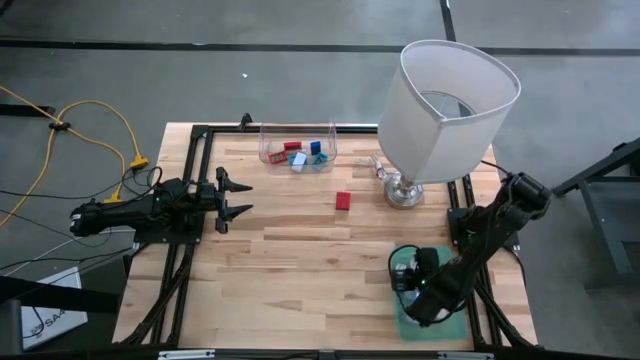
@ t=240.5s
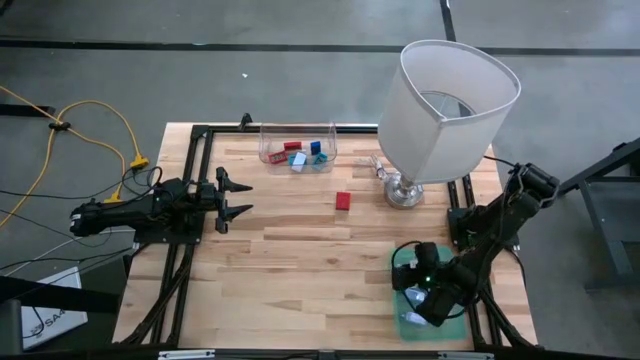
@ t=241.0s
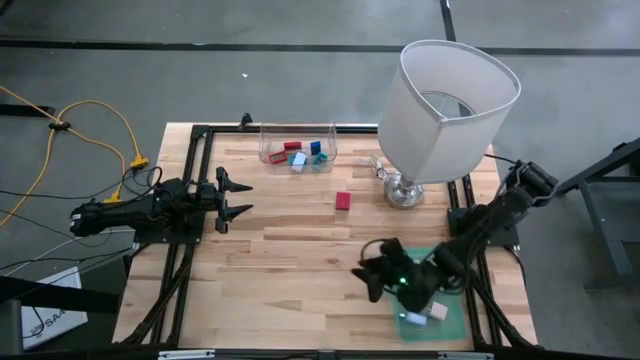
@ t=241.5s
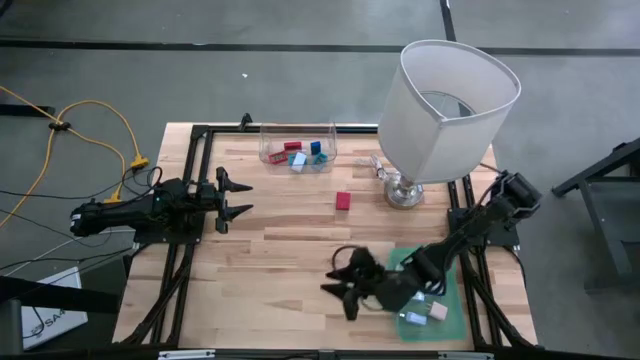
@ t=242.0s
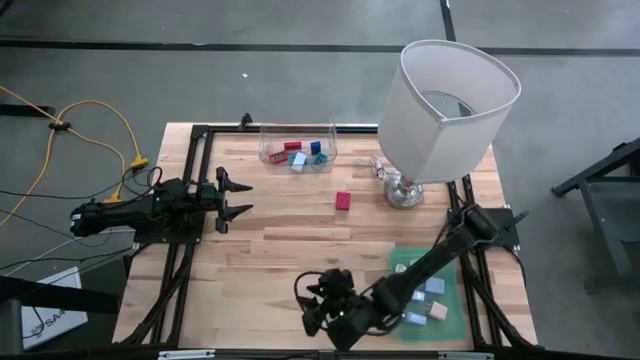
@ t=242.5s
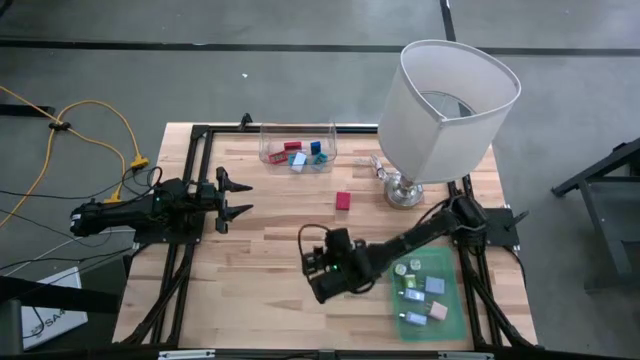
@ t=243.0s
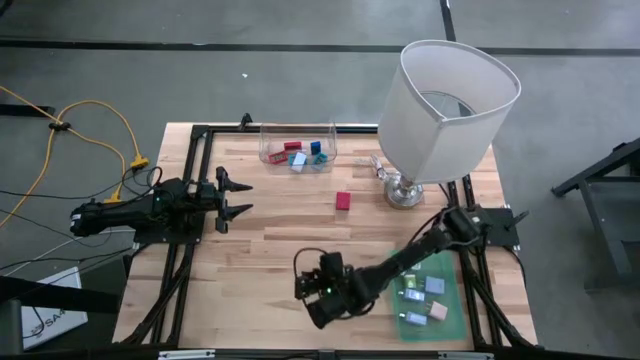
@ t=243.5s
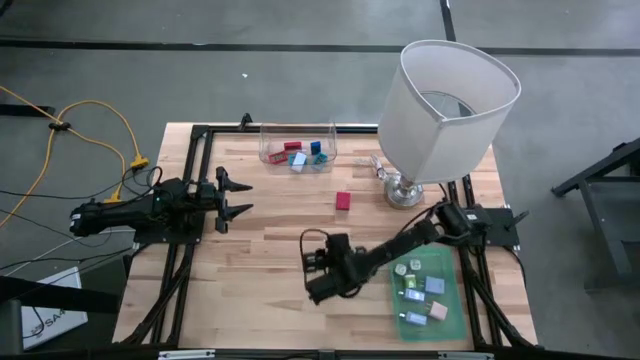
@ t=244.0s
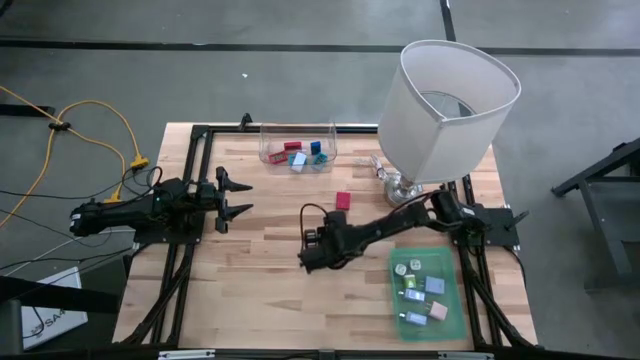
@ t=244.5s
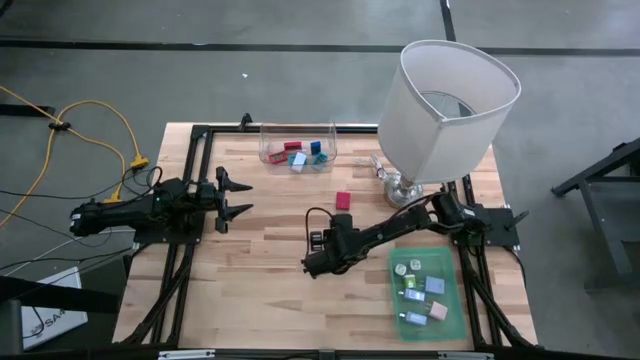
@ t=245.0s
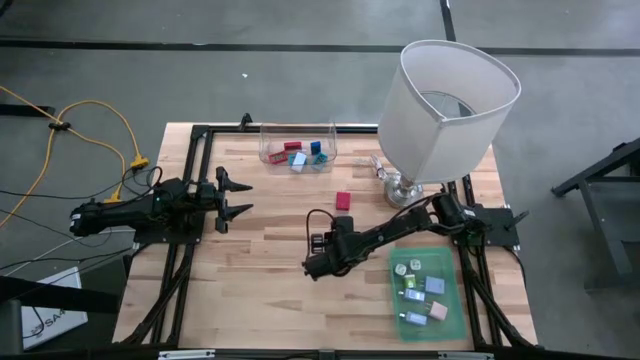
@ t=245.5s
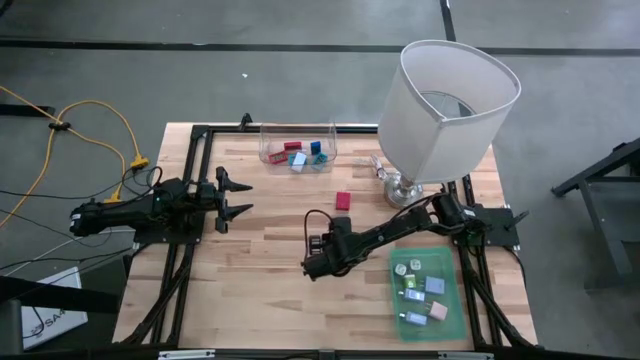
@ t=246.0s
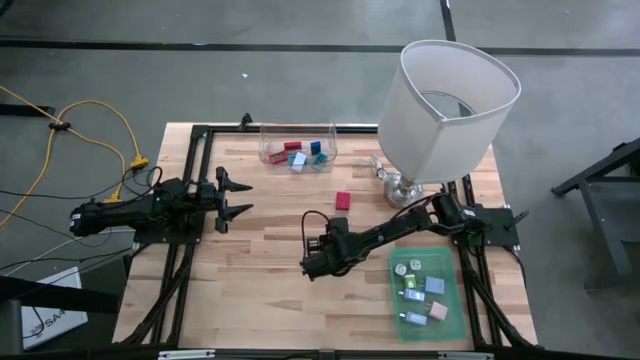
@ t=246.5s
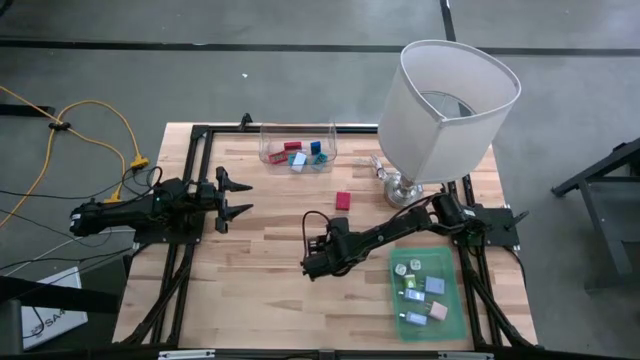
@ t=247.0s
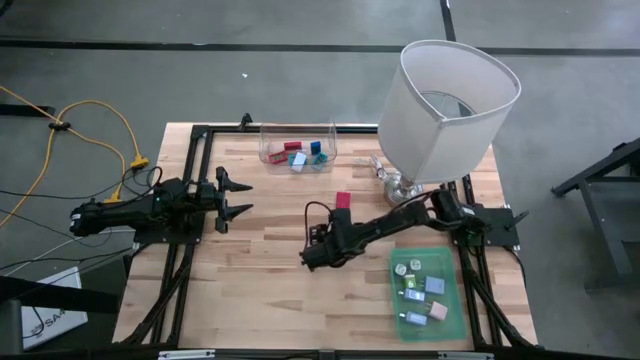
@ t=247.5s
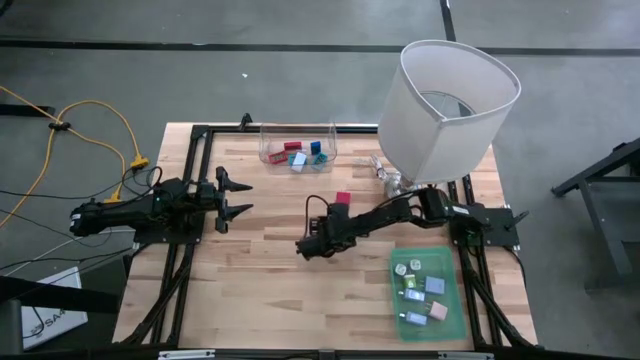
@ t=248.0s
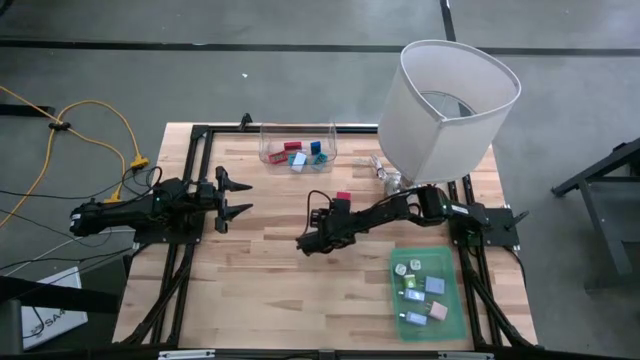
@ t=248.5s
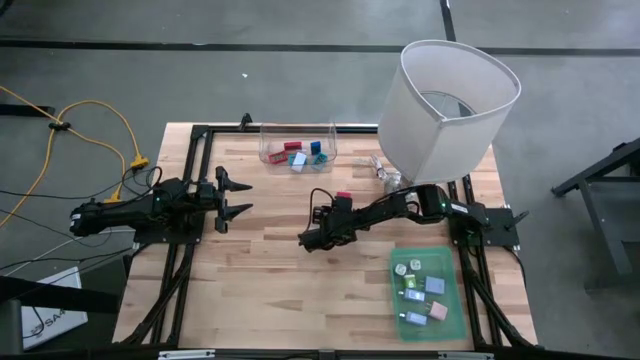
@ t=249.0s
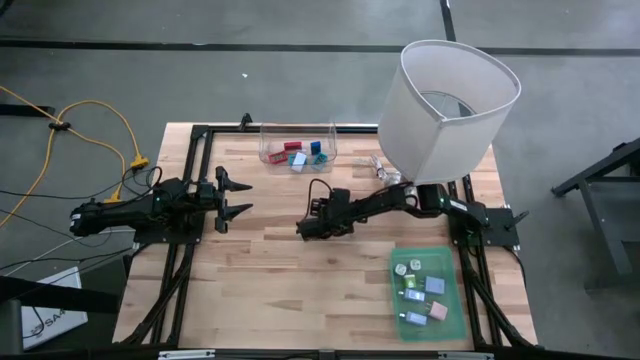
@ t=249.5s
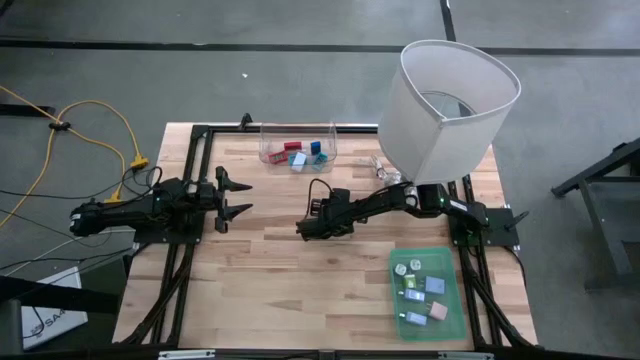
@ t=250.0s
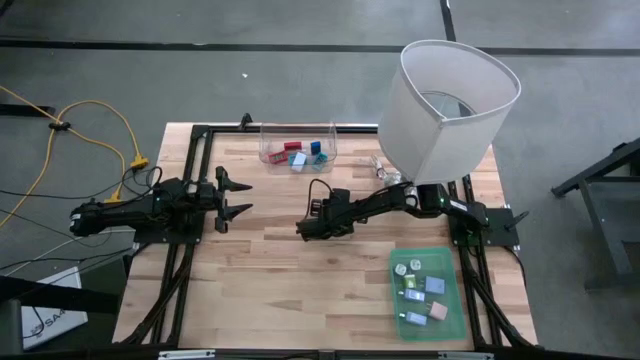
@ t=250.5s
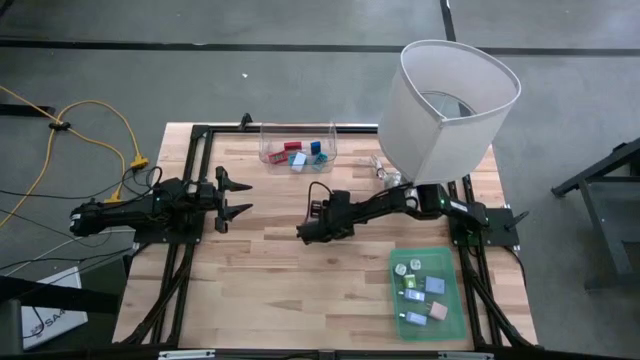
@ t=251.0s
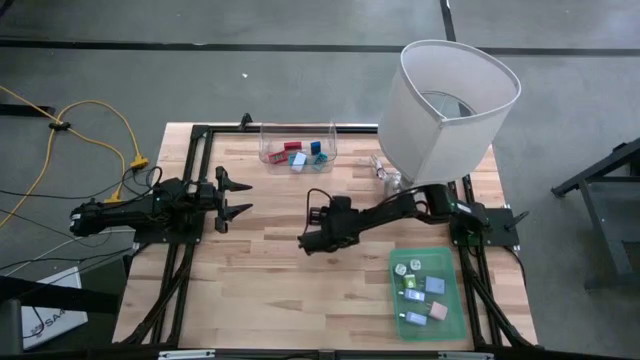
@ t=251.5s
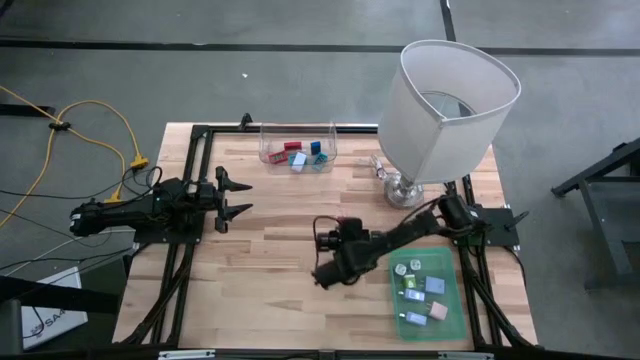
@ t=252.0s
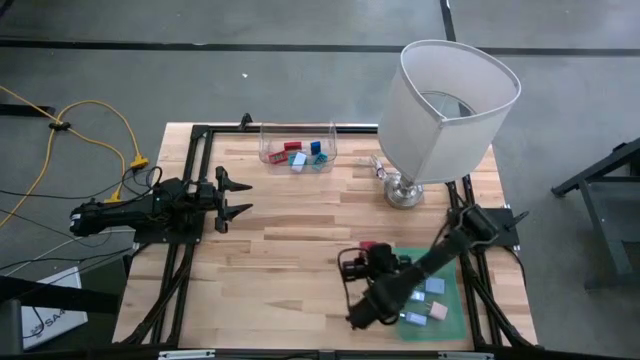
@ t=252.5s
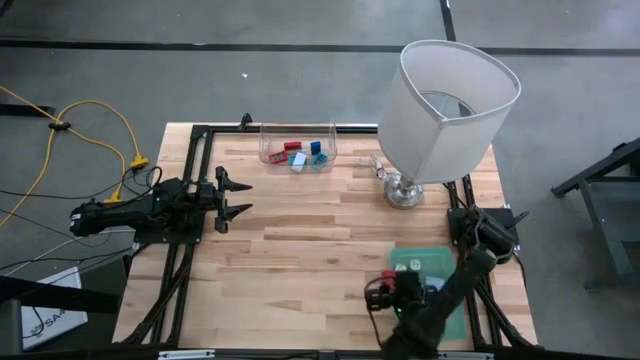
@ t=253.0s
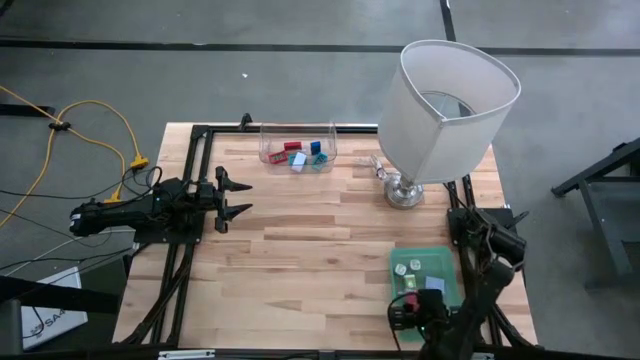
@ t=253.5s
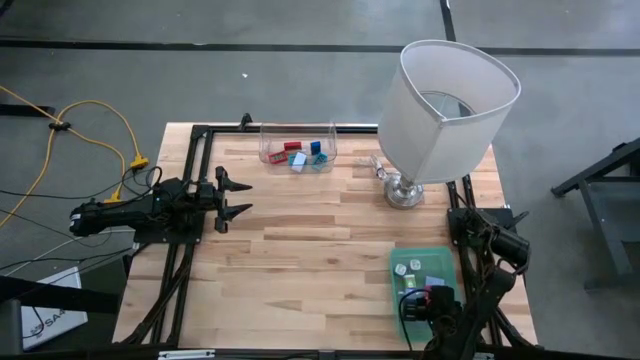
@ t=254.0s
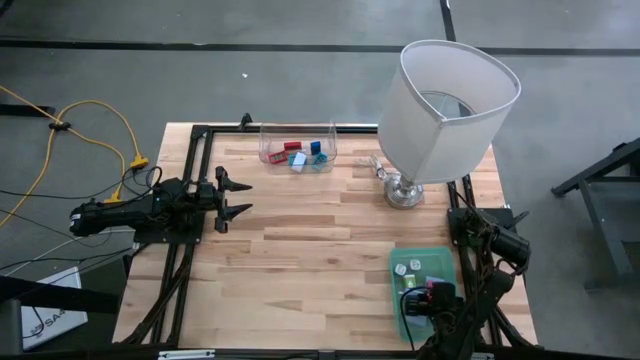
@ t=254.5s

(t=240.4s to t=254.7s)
Task: Pick & Place Office items
Put the red charger adapter into the green bin

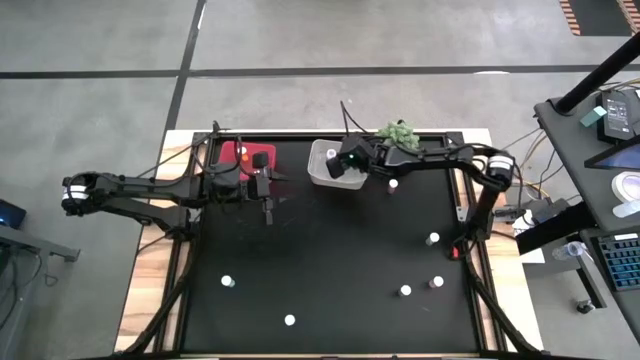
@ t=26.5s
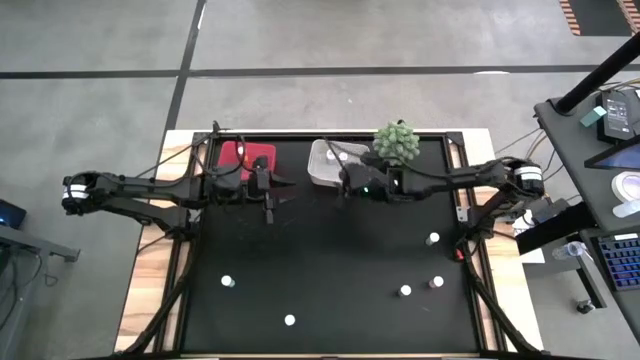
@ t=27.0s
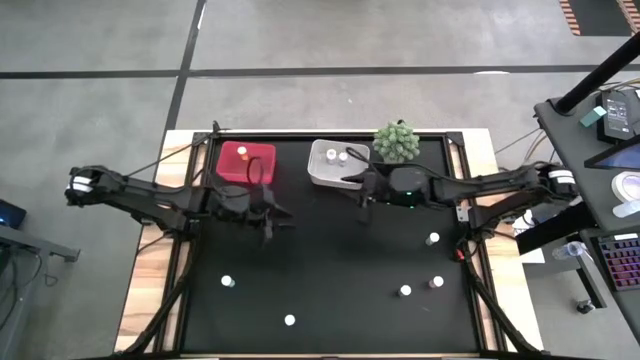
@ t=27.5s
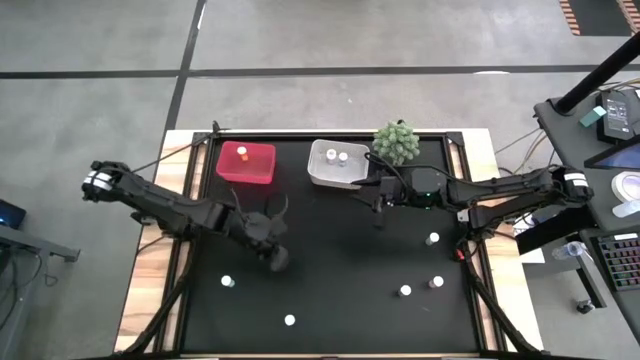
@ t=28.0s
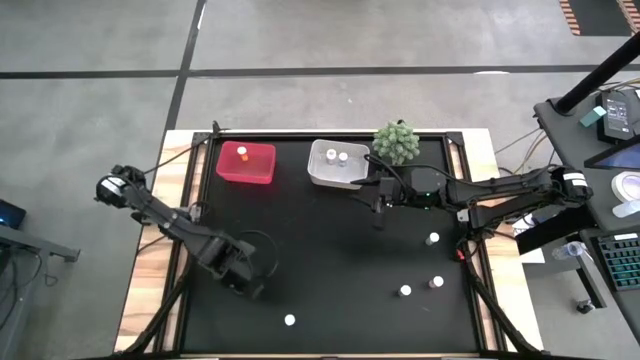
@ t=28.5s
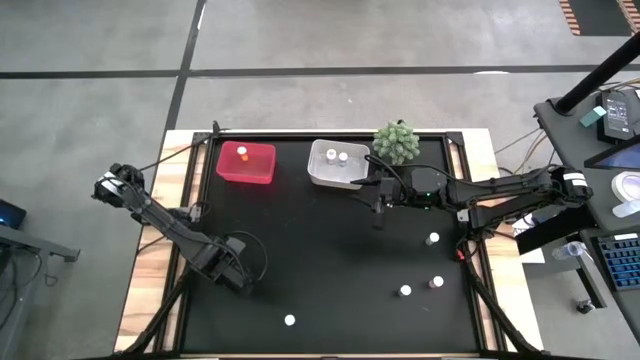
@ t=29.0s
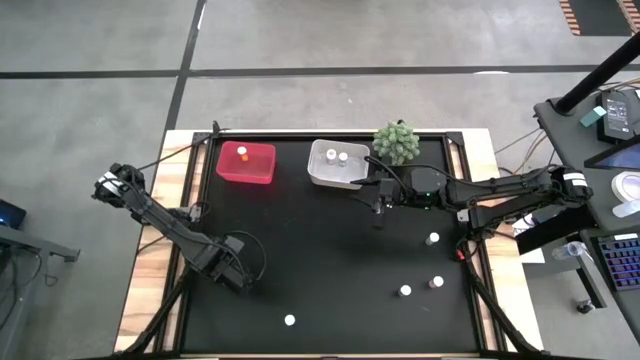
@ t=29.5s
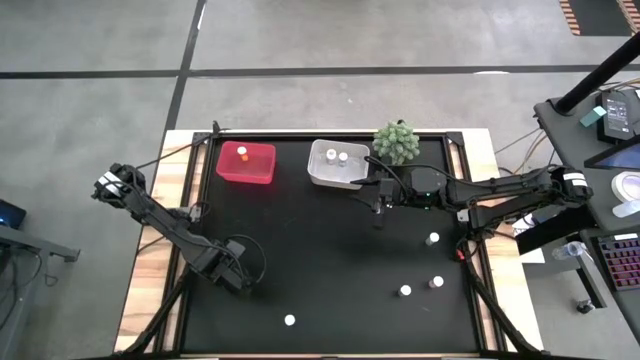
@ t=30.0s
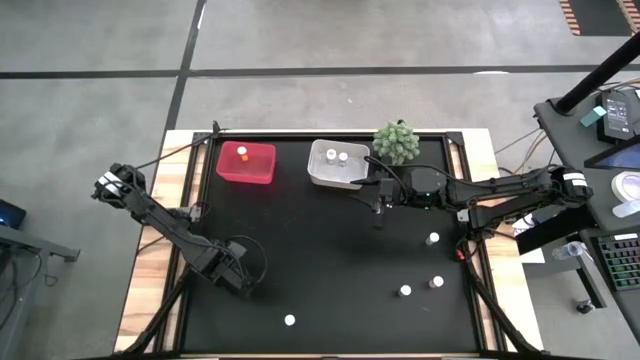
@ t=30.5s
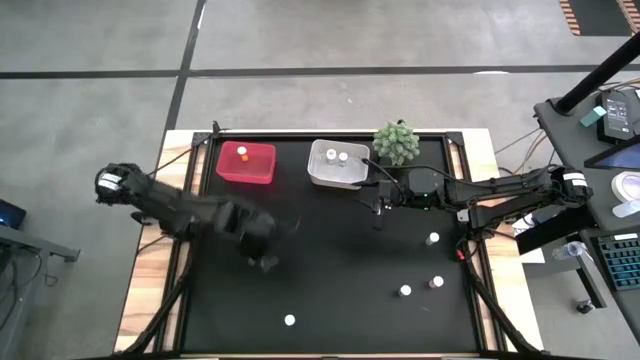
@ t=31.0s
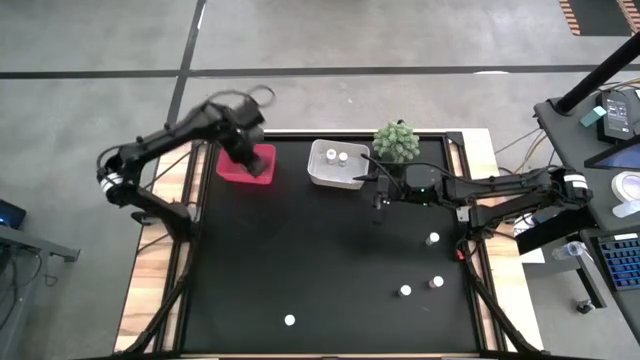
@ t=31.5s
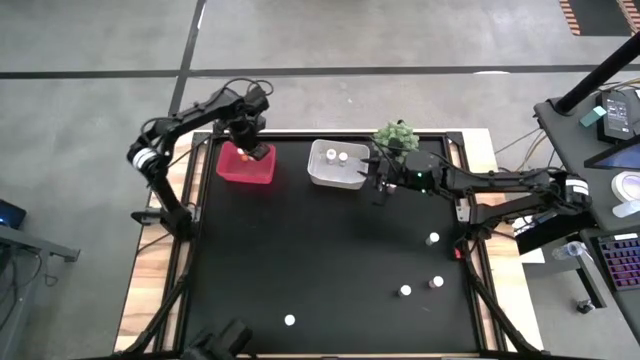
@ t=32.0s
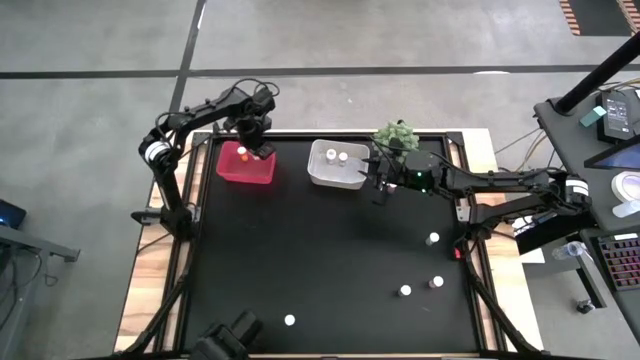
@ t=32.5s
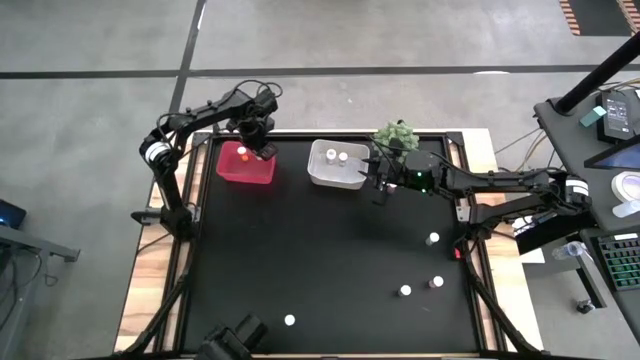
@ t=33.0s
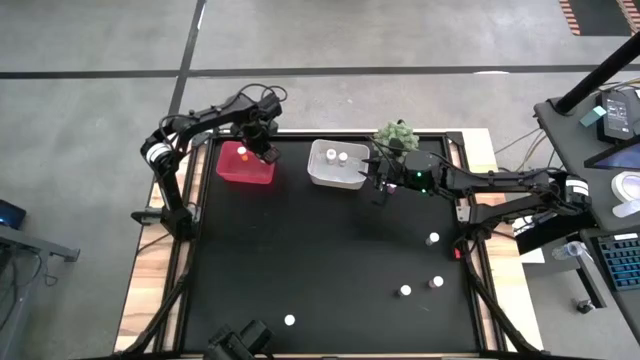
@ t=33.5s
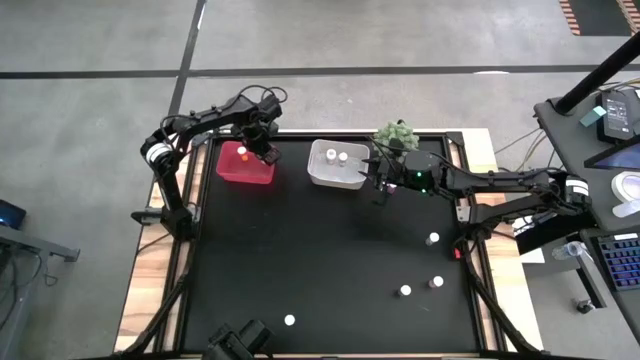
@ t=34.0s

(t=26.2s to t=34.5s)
Task: Pick and place medicine bottles into bin by pill shape (circle, oval)
Put the blue tablet bottle into the pink bin
